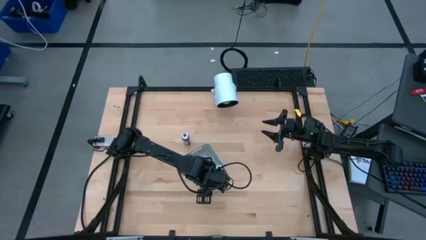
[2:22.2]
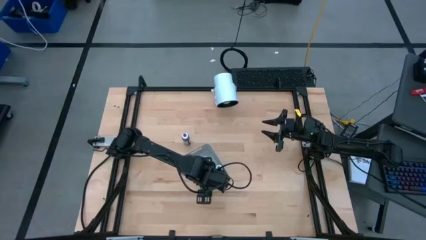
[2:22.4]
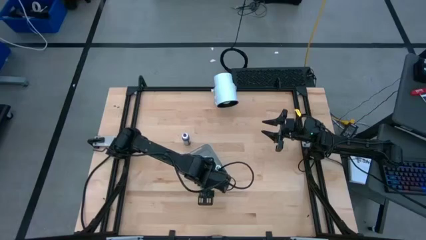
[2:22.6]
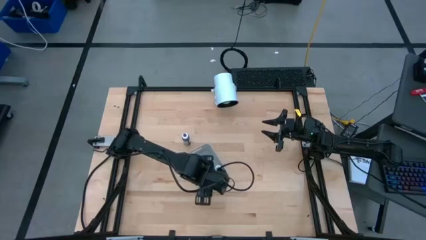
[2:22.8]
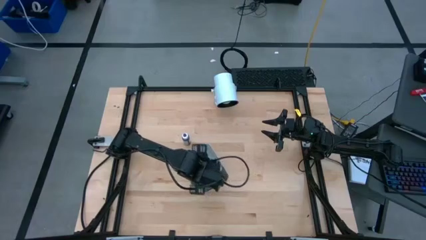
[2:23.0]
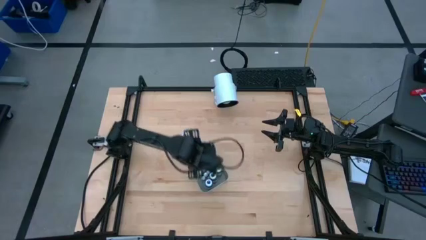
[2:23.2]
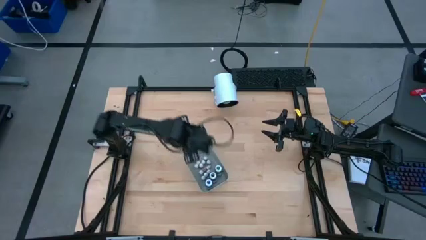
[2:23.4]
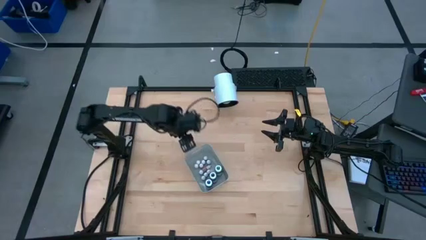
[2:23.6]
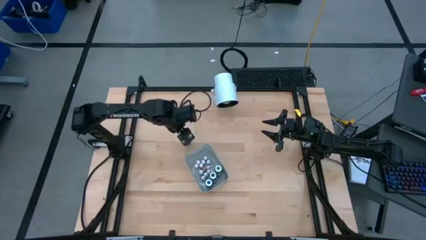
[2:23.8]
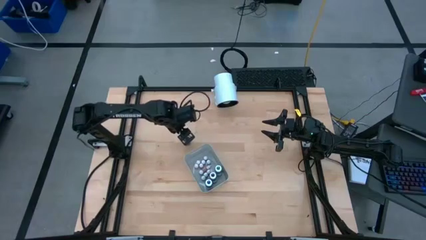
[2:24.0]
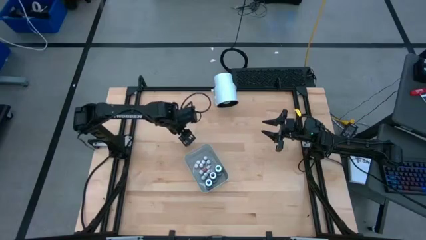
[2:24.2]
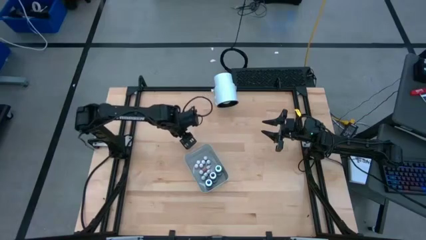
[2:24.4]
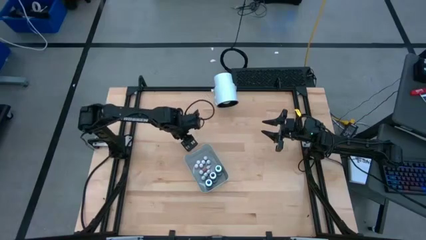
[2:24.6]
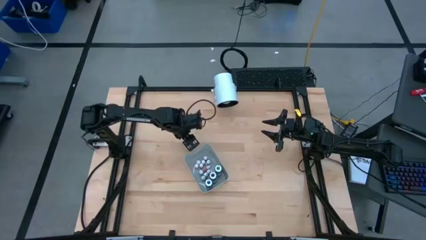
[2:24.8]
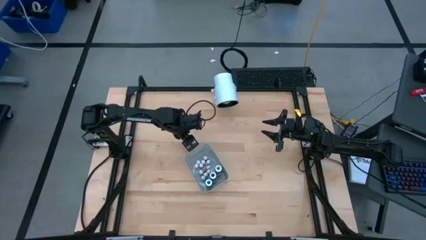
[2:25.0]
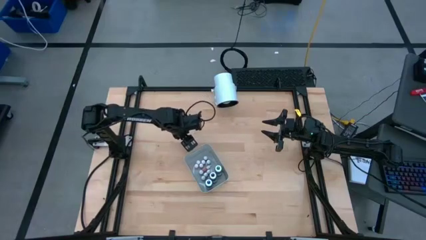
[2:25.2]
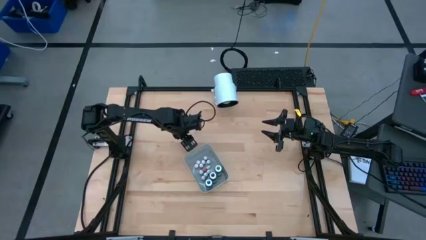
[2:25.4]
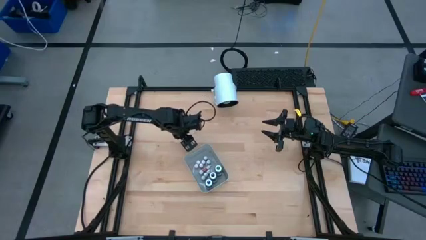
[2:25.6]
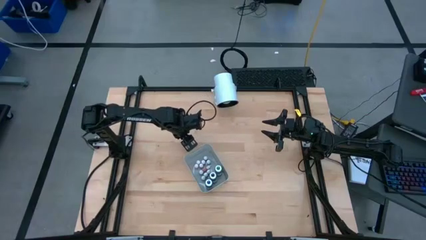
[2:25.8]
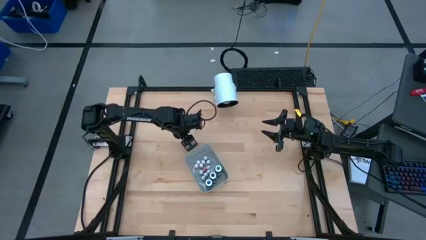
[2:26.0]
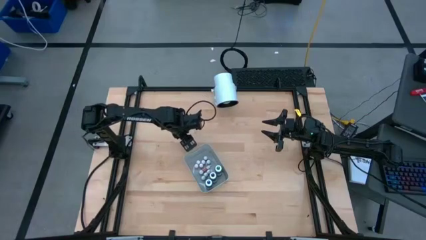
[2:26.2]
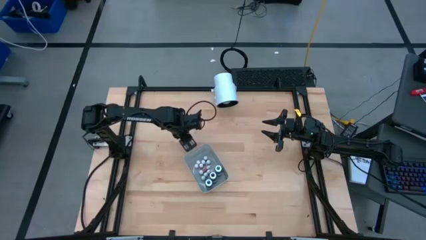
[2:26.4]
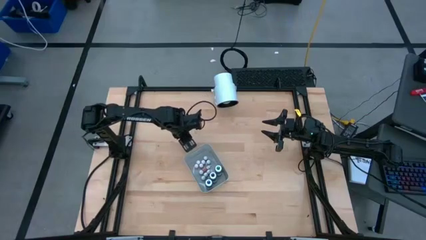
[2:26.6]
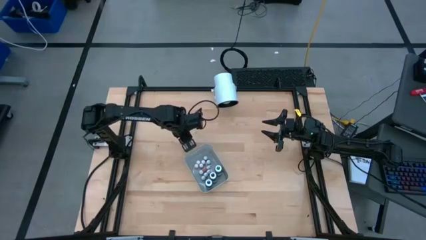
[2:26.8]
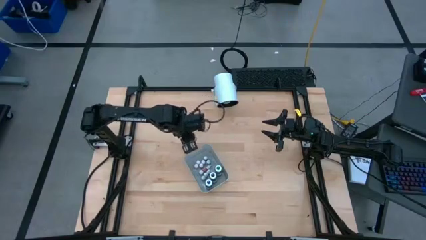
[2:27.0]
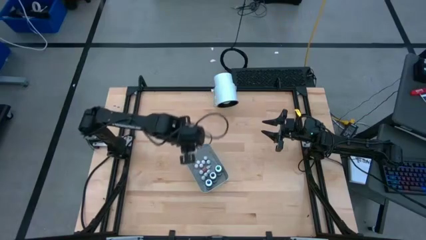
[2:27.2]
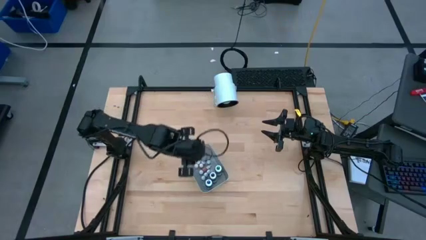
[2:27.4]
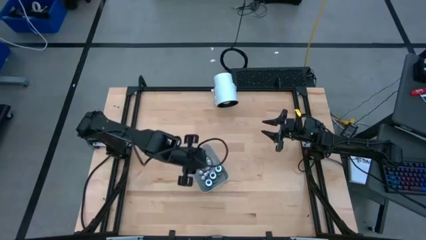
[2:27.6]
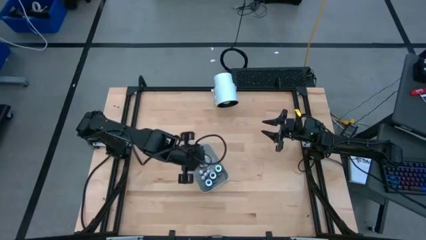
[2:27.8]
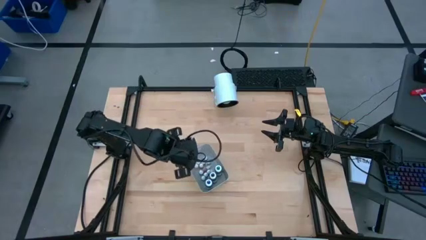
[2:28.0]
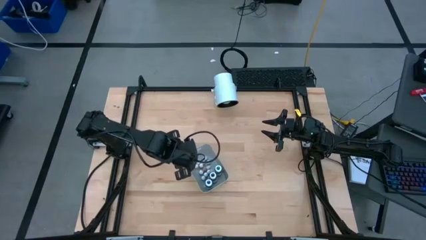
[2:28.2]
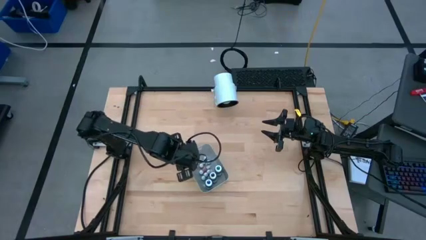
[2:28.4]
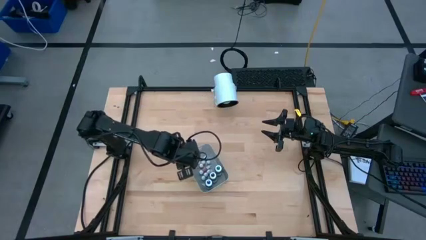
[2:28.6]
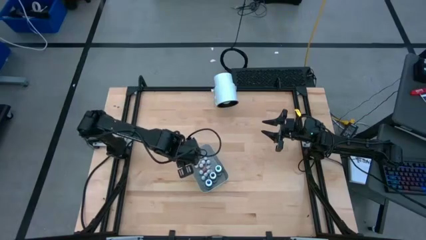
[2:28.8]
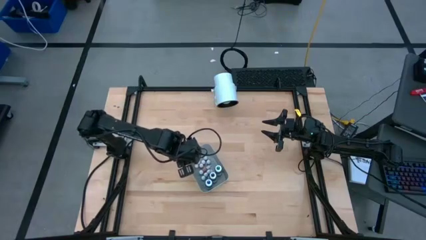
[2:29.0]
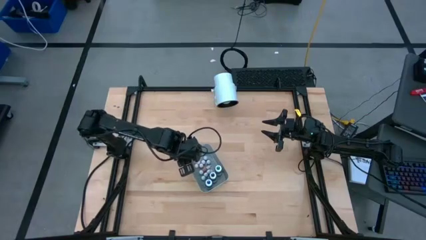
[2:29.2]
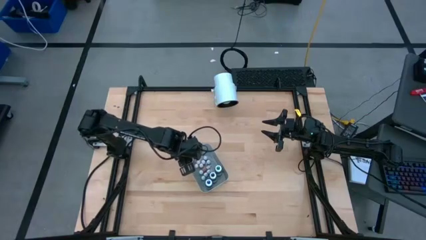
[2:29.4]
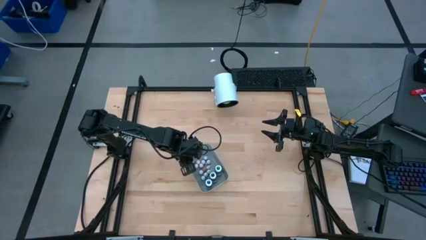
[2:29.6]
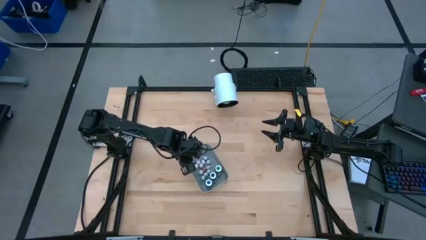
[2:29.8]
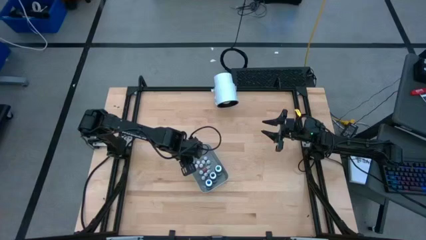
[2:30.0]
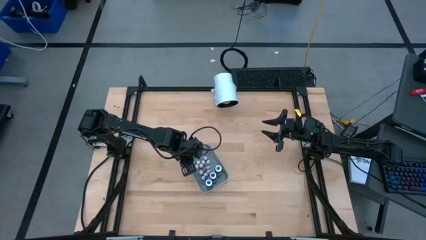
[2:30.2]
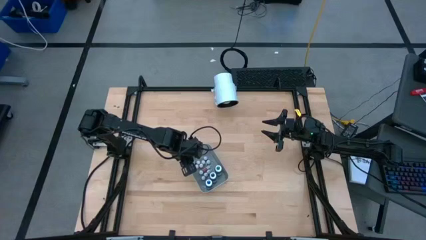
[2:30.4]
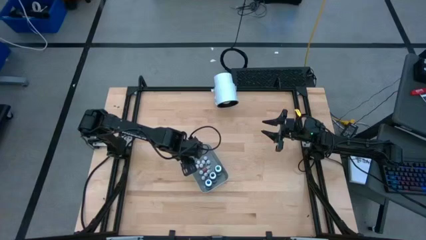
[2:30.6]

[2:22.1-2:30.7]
Task: Pick & Place food coloring
Put the large violet food coloring bottle into the gray bin

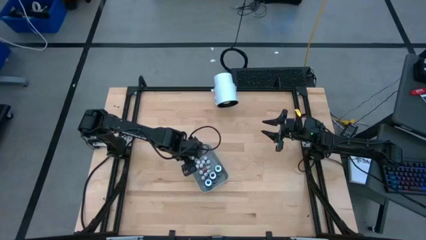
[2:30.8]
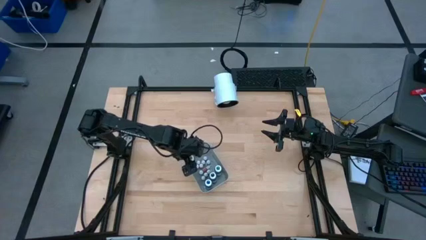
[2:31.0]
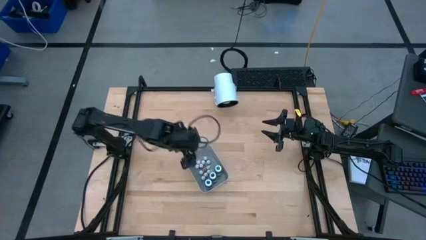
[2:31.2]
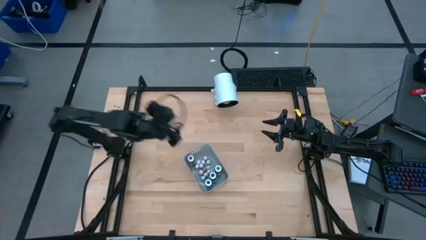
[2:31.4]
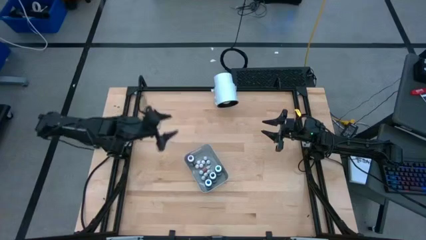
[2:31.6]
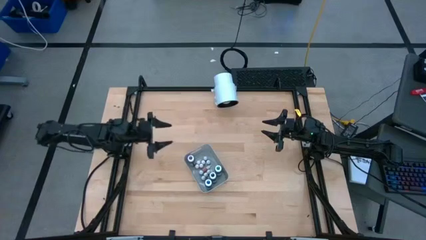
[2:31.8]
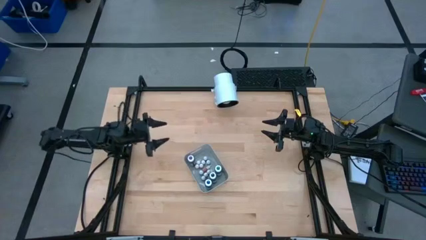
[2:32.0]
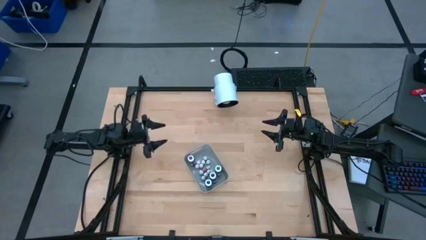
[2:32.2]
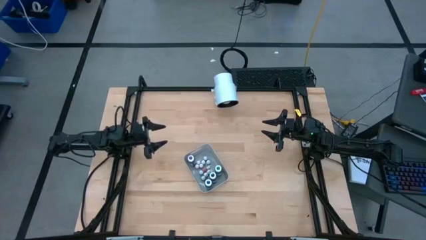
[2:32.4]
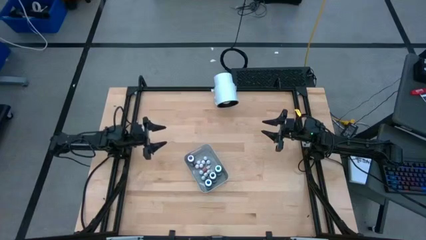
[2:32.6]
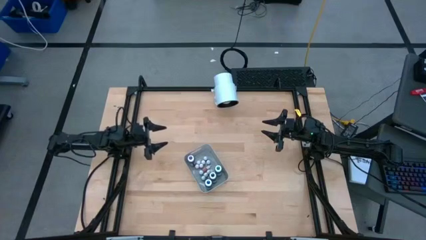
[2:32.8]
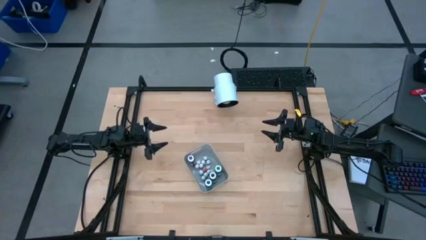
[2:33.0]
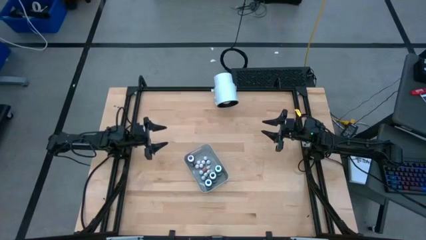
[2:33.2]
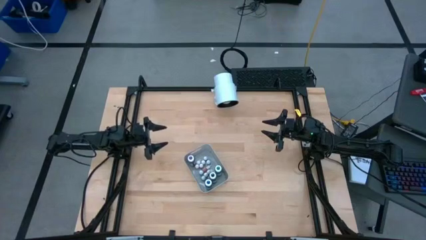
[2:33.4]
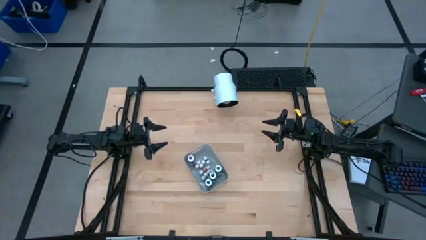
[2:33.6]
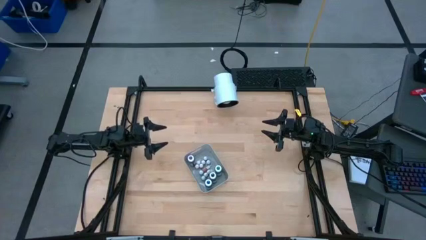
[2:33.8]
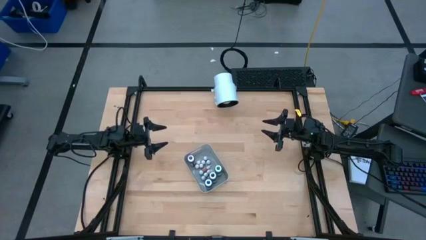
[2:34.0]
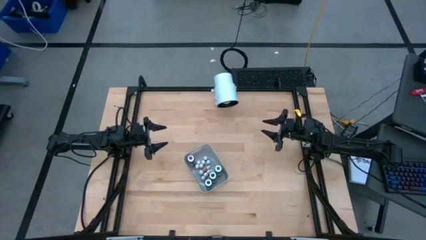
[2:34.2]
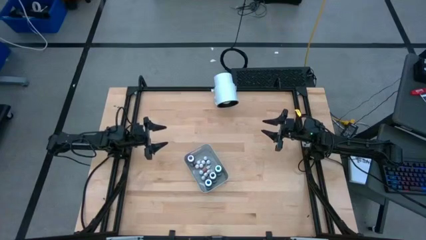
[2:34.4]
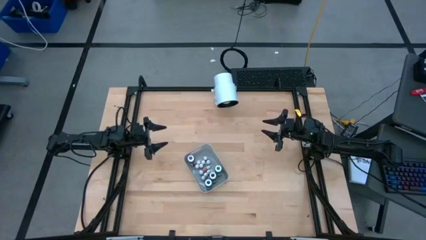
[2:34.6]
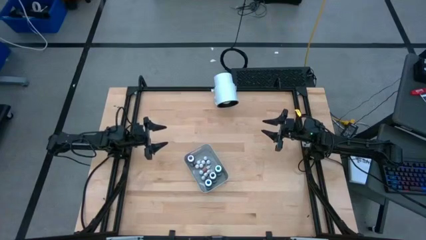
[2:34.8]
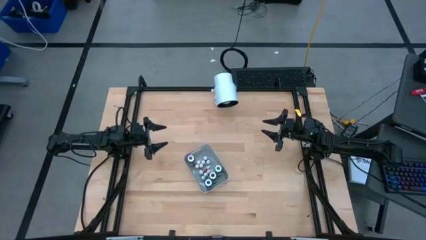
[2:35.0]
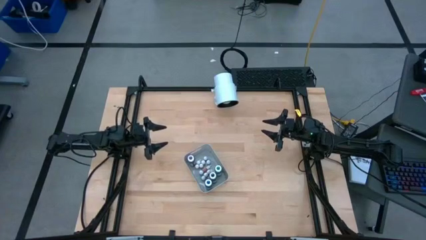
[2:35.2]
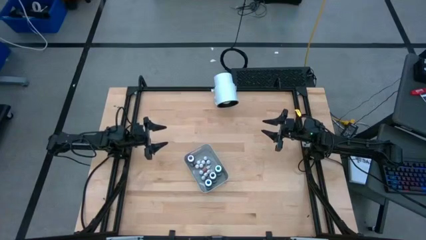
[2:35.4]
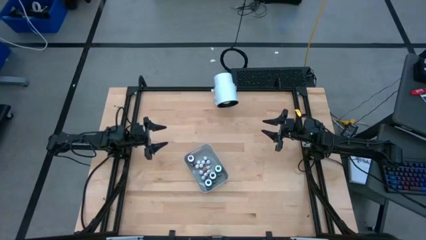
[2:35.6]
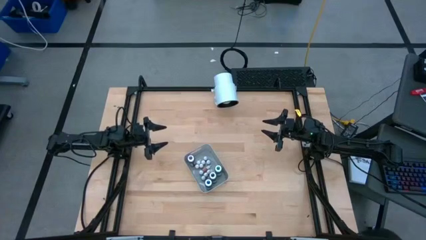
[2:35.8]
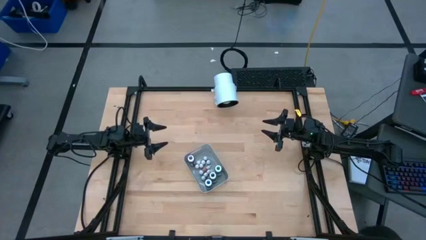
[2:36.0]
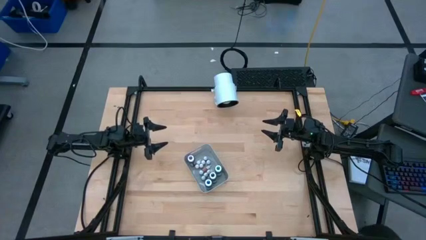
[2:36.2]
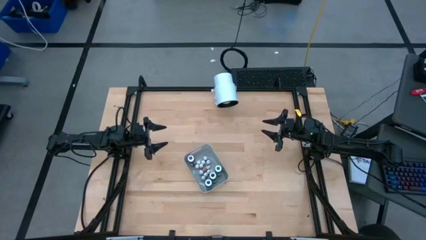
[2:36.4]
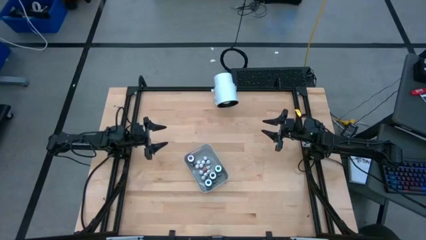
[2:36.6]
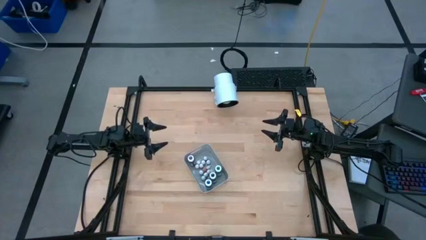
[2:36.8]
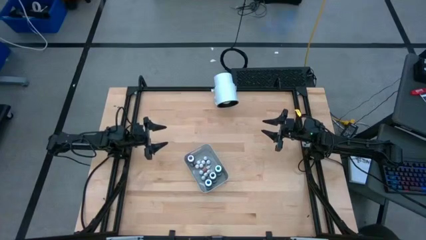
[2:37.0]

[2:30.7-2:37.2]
Return to Home Position

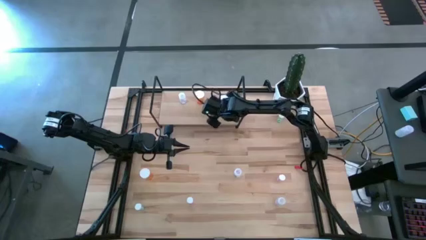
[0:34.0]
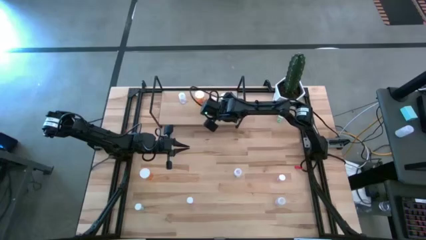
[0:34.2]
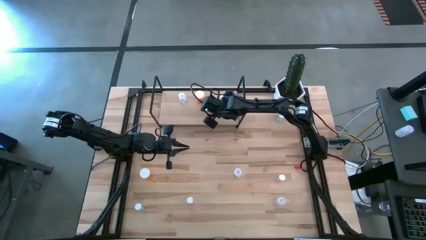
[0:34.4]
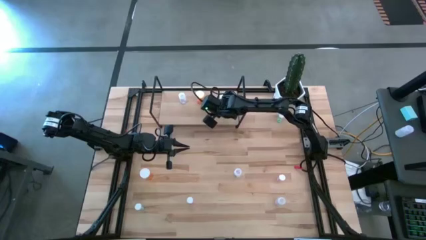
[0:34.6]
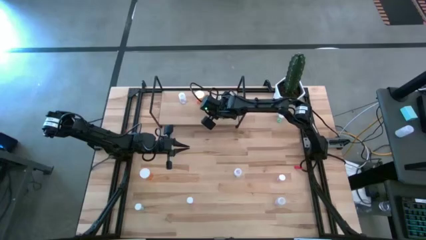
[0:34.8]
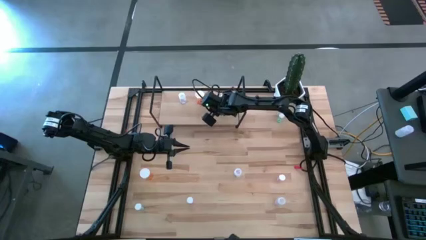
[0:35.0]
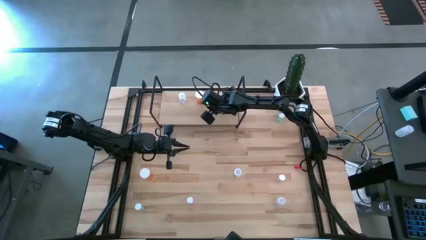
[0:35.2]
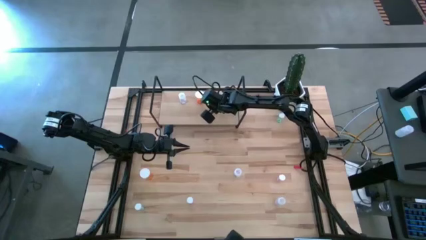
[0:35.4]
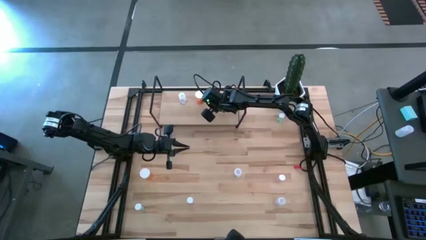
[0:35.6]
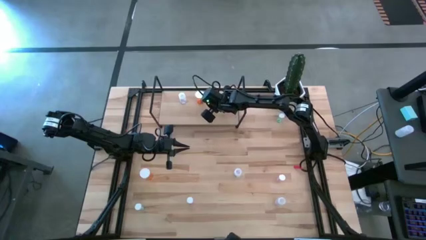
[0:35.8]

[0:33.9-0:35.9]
Task: Pick and place medicine bottles onto shelf by color
Adjust the green pill bottle on the shelf
